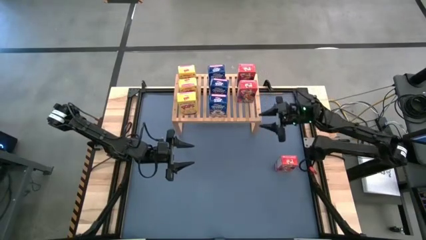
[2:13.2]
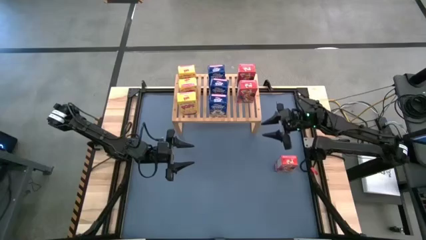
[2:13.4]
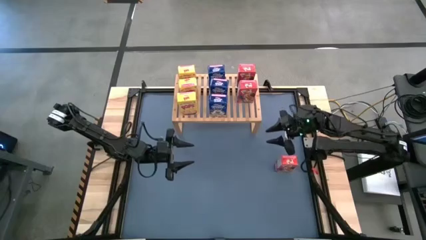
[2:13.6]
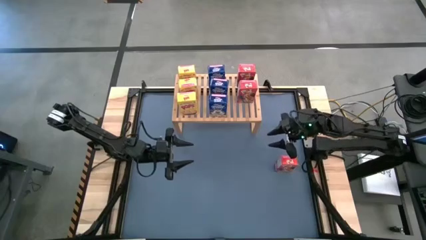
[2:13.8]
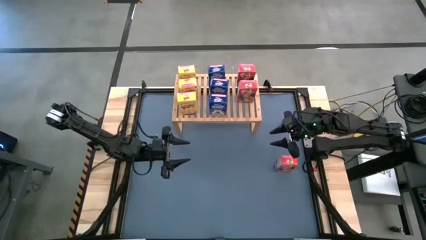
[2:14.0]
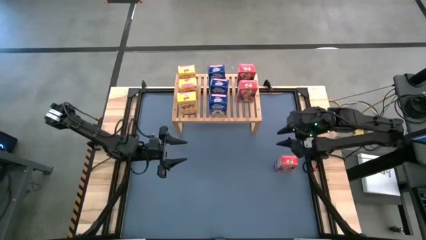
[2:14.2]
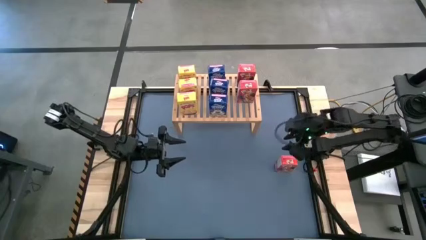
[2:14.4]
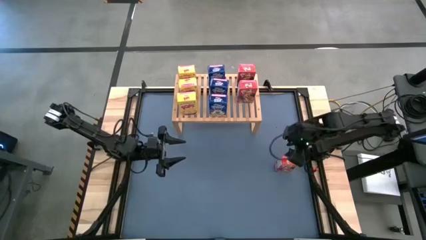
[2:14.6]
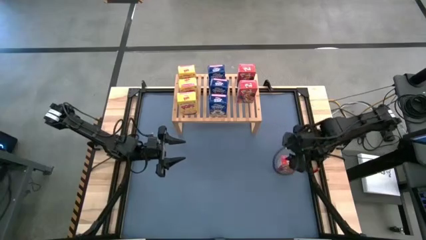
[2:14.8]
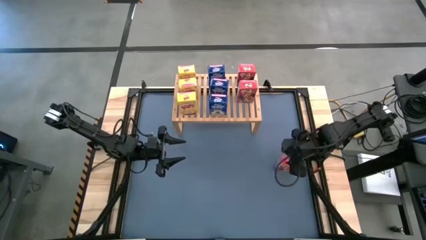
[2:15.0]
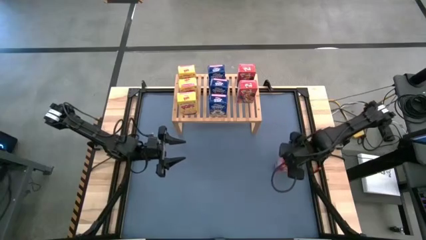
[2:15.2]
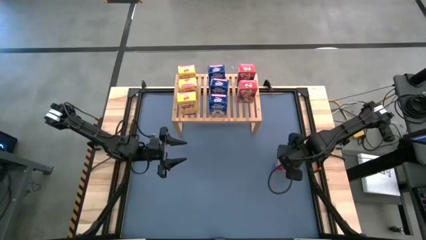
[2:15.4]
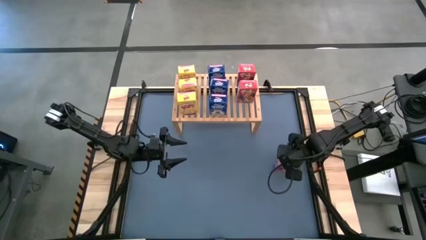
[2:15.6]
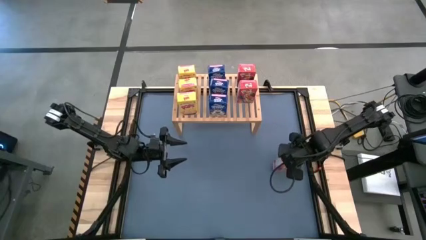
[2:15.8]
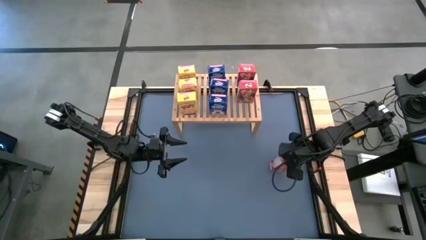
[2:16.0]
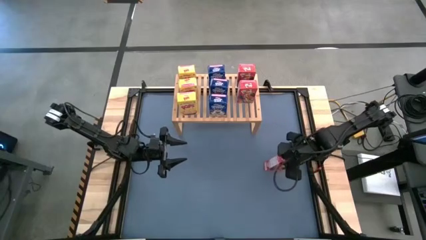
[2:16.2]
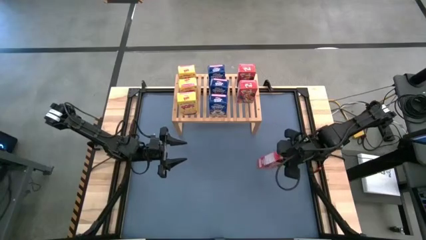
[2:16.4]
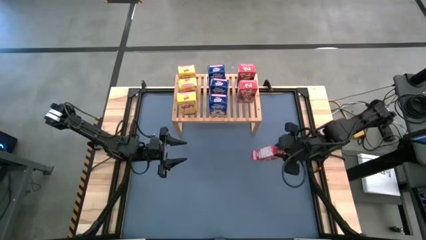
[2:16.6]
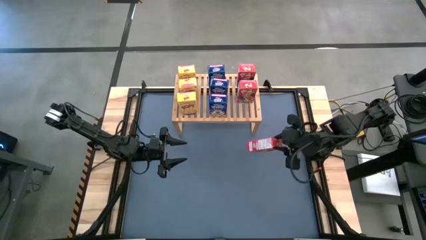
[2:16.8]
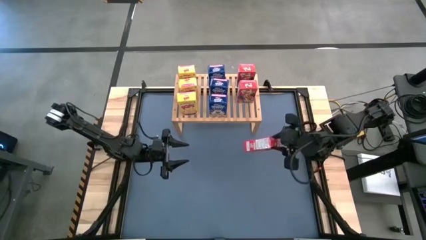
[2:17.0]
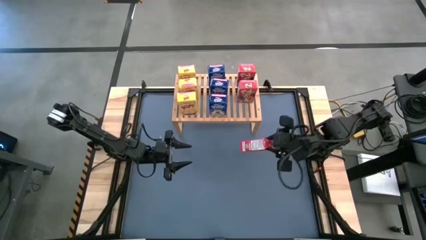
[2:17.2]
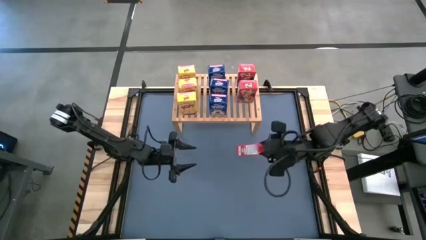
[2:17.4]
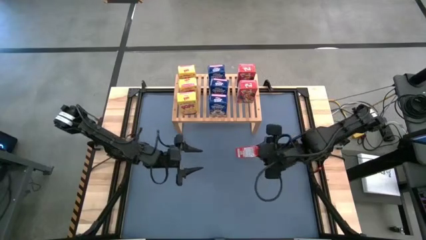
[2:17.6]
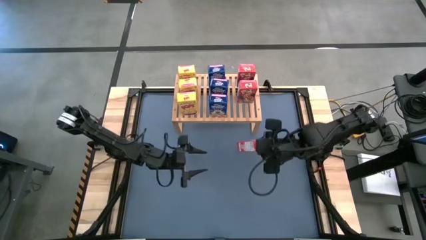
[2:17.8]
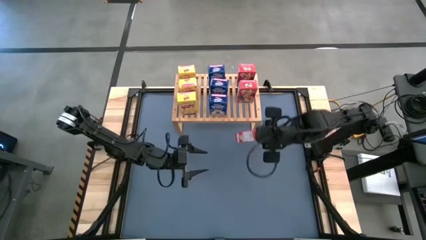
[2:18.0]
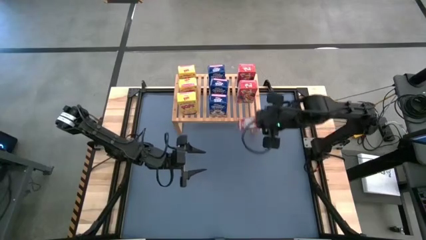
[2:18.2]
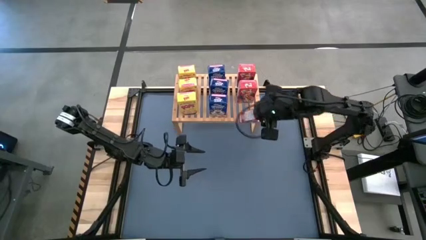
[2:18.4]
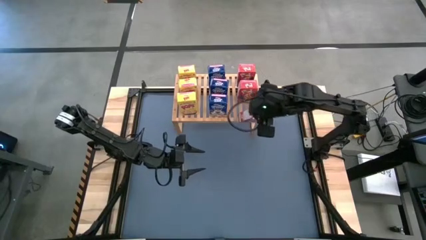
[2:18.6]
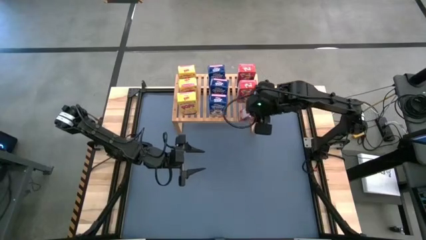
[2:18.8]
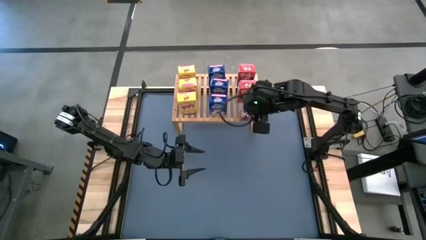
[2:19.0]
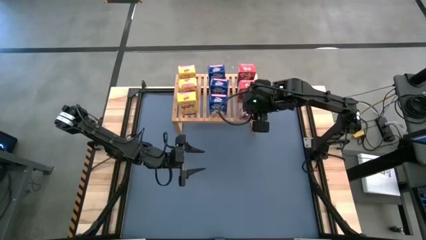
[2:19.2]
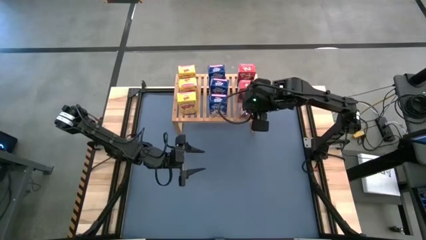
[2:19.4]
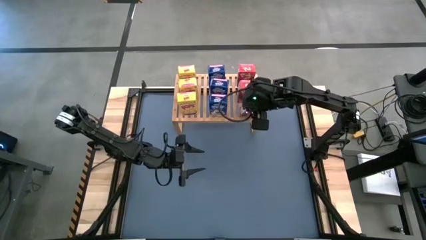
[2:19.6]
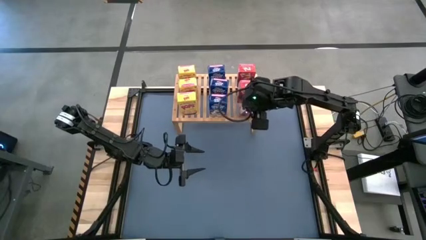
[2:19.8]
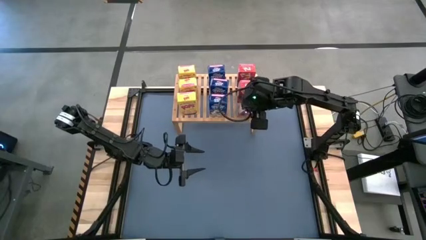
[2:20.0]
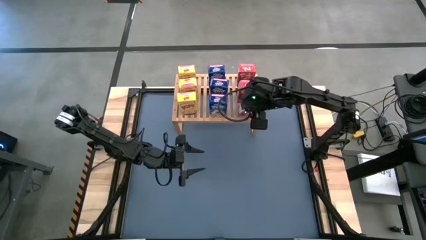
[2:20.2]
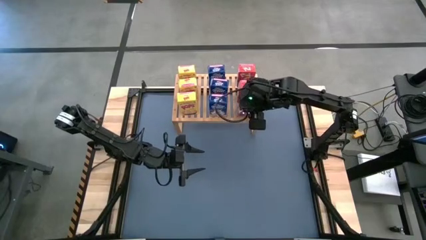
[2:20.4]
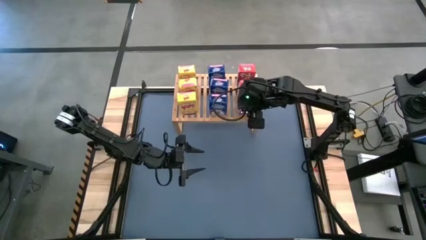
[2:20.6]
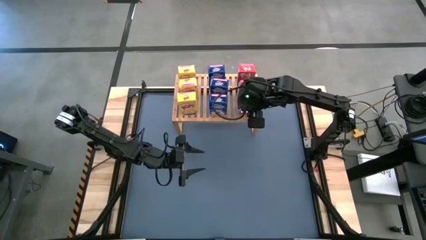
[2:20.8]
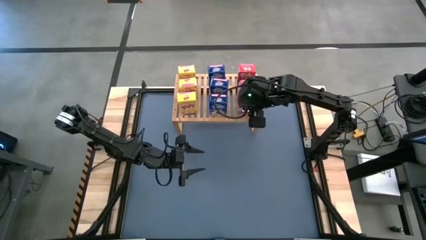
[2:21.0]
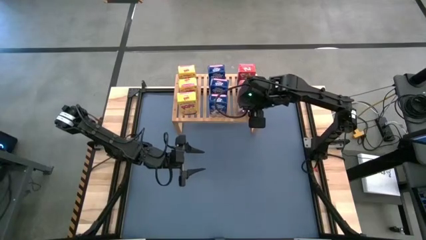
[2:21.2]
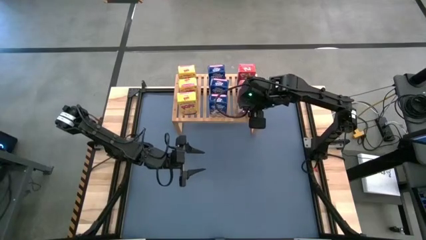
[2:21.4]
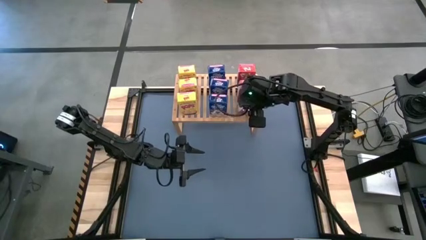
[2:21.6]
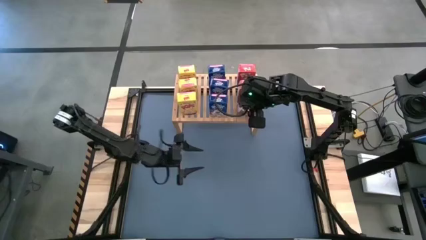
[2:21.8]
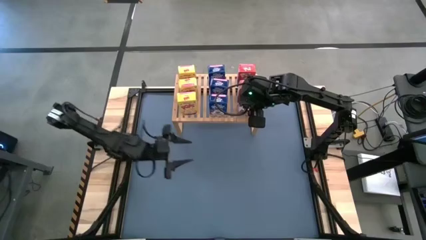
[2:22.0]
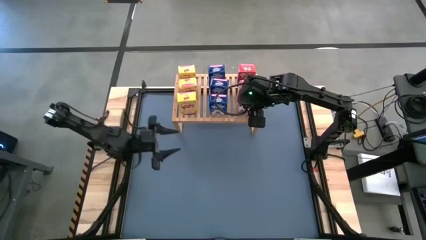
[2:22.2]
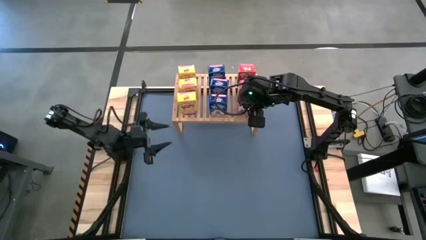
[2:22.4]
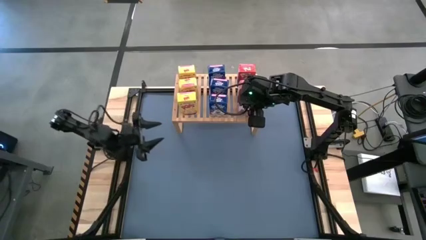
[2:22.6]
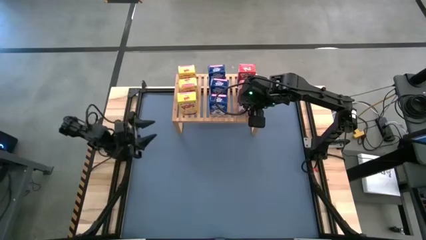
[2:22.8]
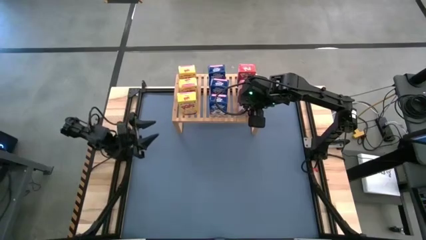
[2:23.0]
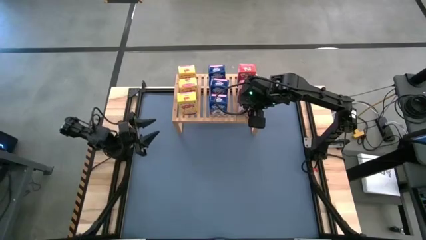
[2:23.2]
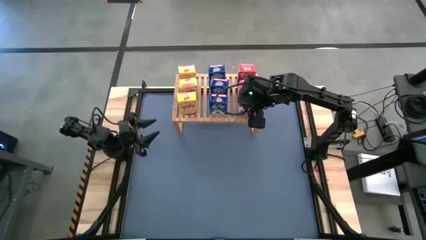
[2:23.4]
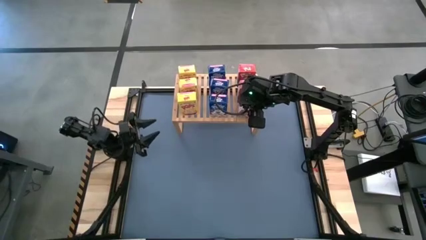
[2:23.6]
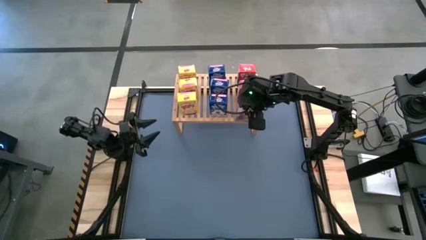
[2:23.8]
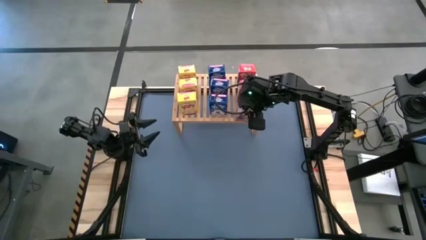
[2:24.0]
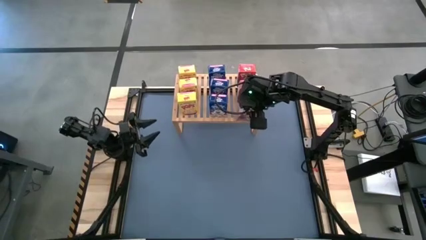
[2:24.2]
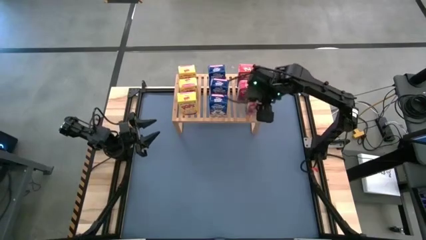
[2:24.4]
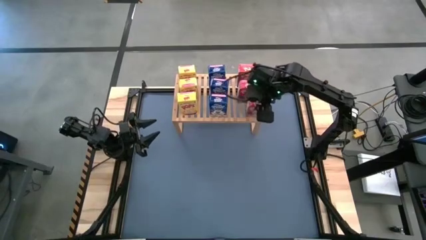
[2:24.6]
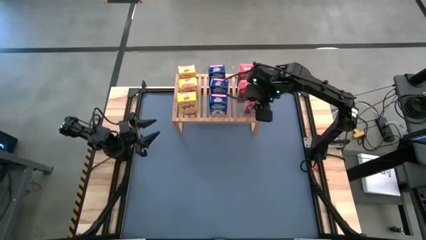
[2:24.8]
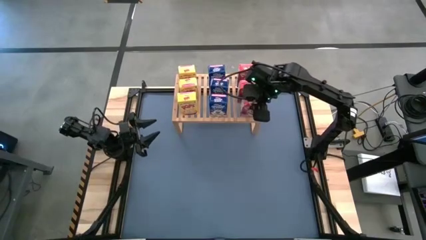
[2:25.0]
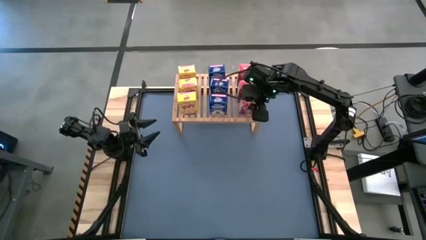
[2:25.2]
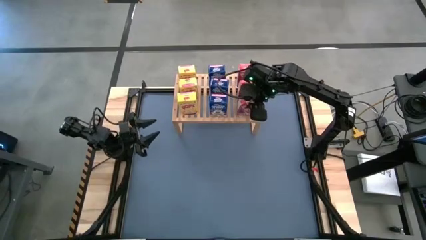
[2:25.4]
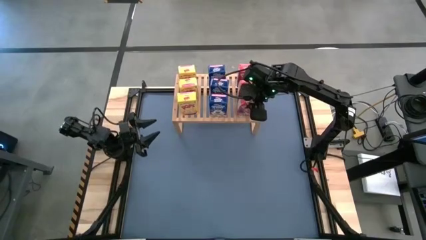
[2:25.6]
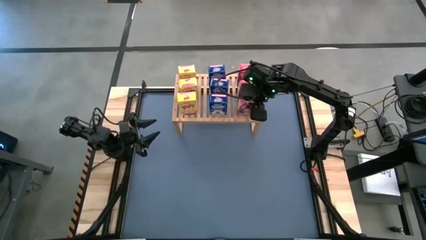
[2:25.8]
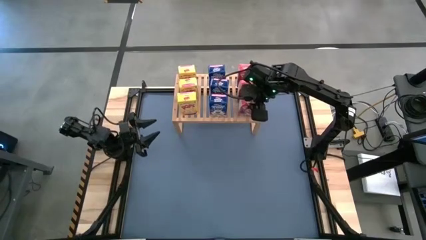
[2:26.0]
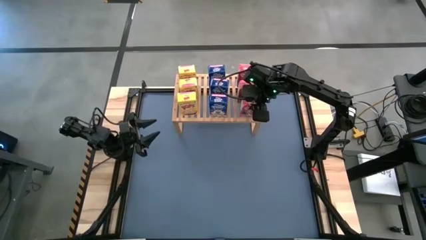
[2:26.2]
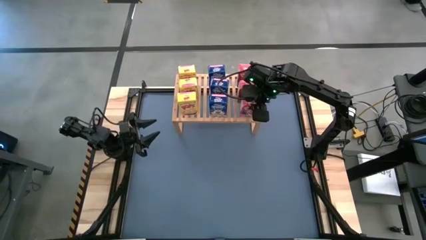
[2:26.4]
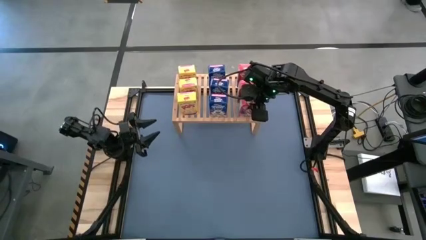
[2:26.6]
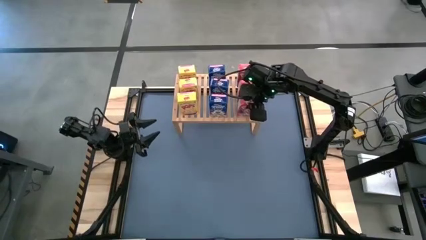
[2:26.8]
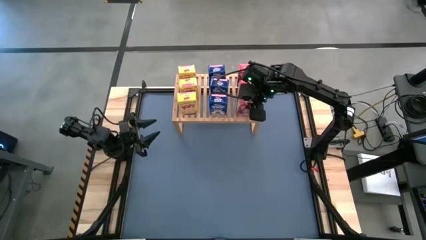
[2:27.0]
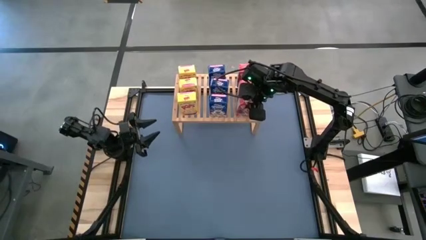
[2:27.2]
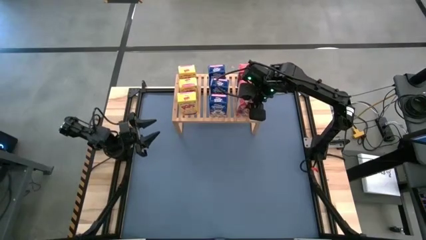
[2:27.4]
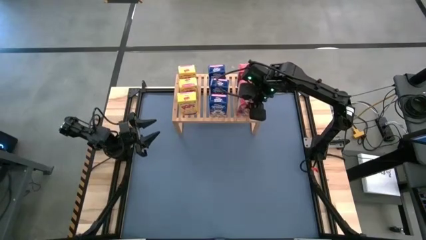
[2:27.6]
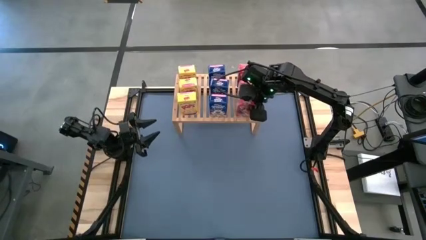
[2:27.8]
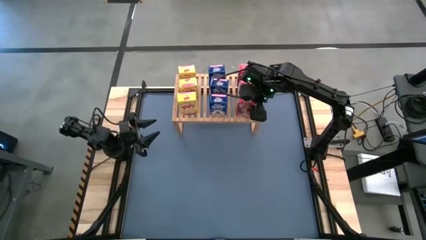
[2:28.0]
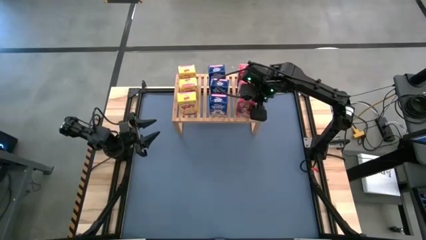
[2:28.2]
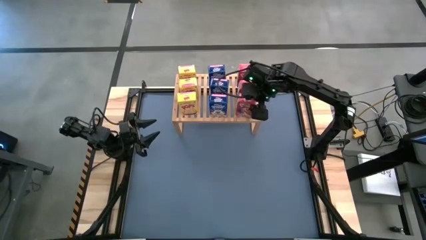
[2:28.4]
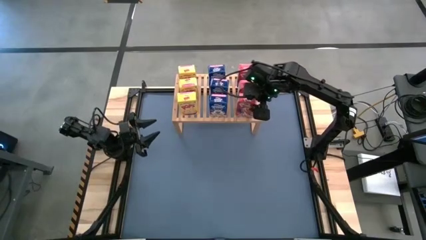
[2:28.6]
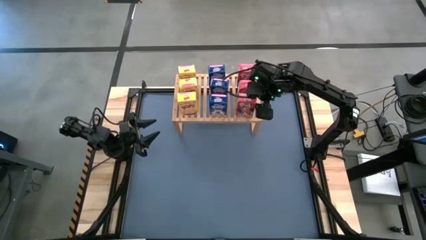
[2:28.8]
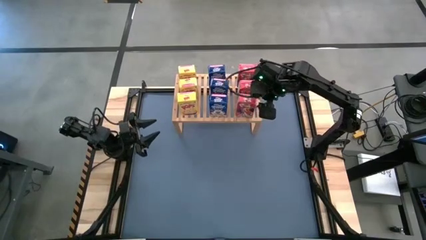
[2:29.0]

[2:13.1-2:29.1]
Task: Stack cereal on shelf
Put the red cereal box aligned with the other red cereal box on the shelf
